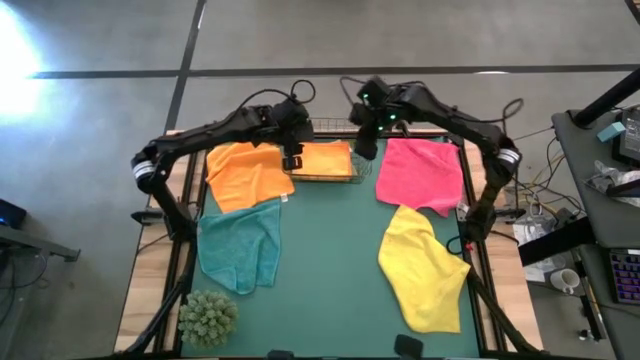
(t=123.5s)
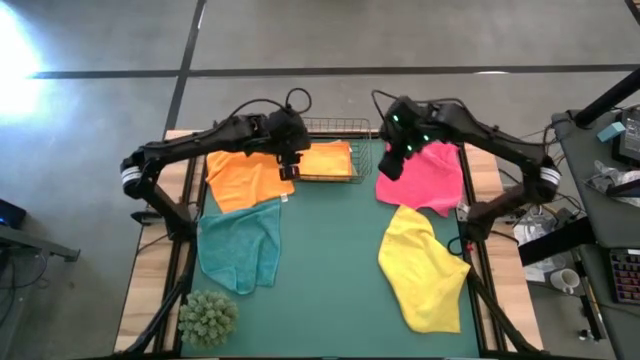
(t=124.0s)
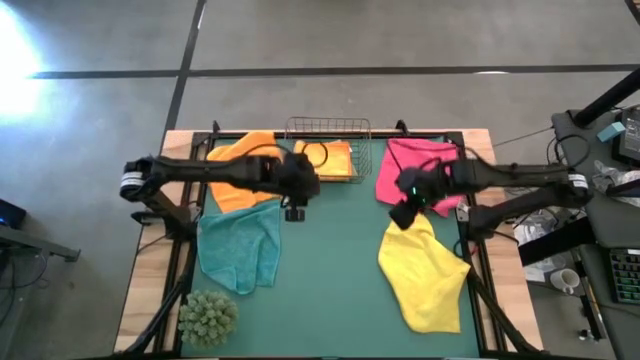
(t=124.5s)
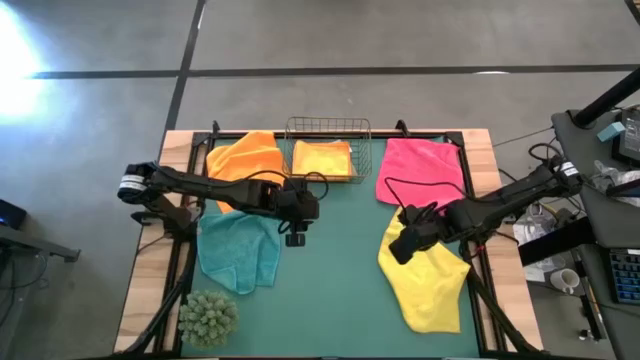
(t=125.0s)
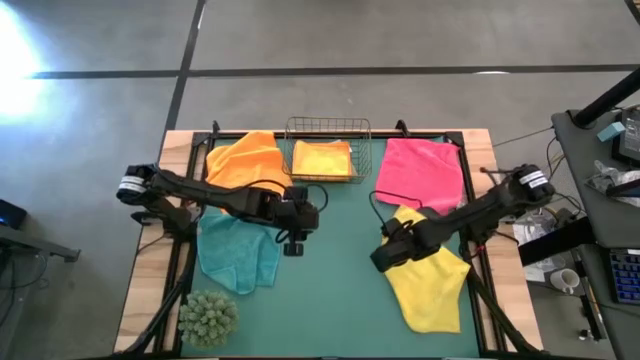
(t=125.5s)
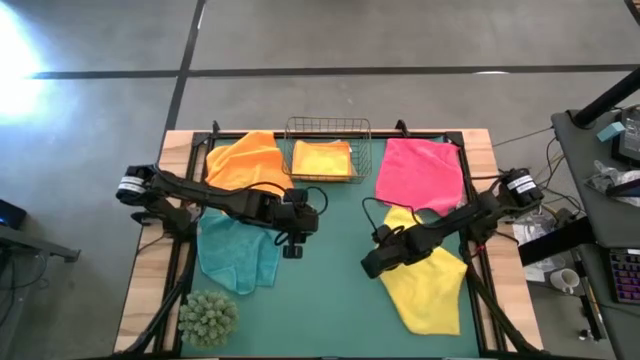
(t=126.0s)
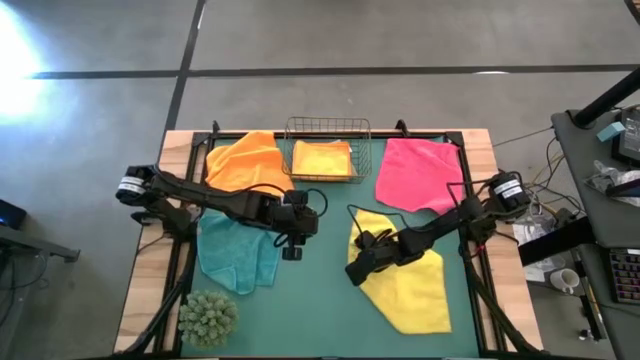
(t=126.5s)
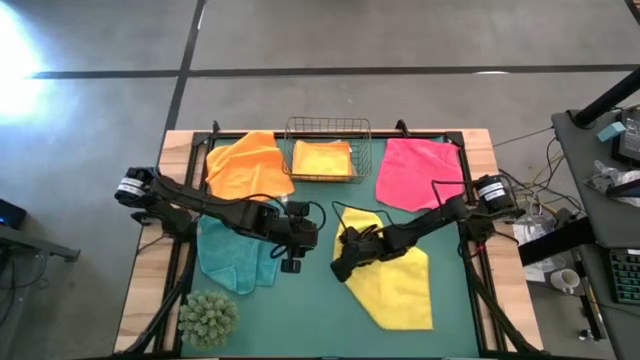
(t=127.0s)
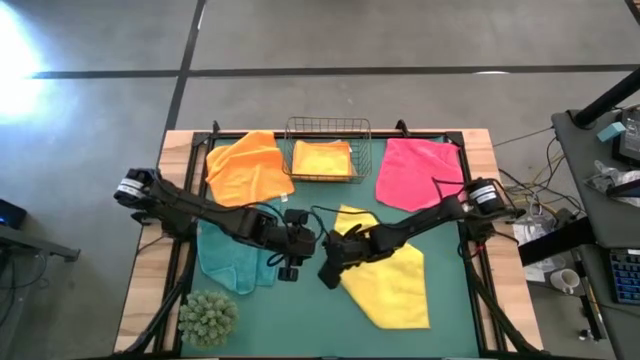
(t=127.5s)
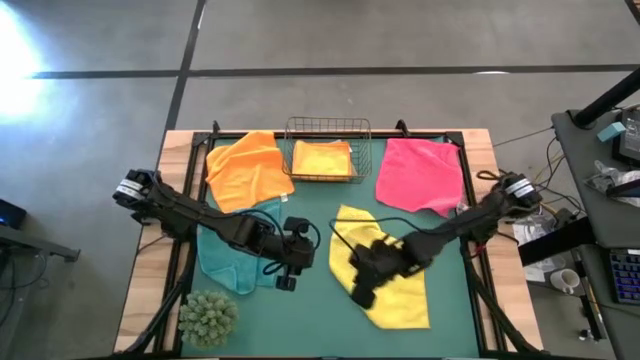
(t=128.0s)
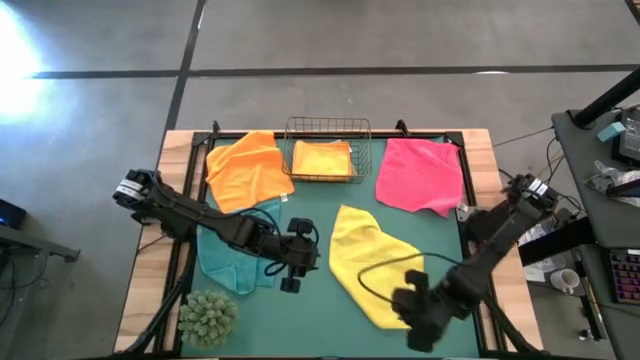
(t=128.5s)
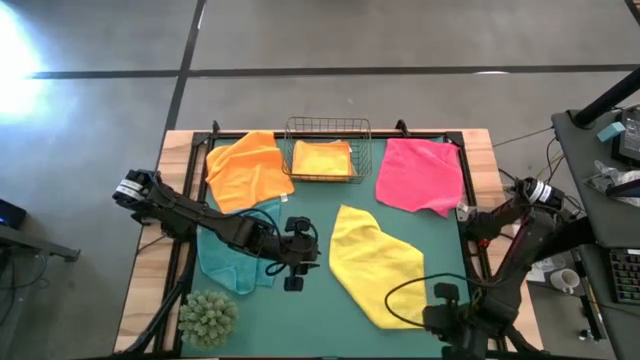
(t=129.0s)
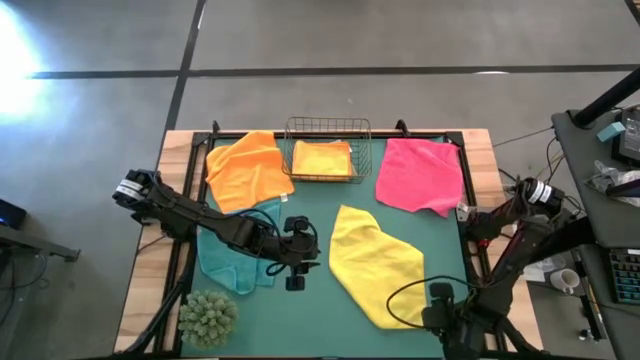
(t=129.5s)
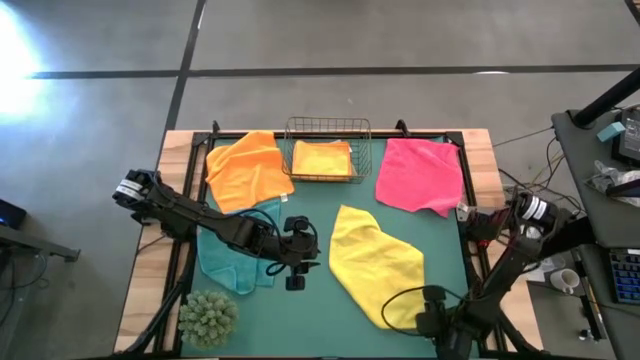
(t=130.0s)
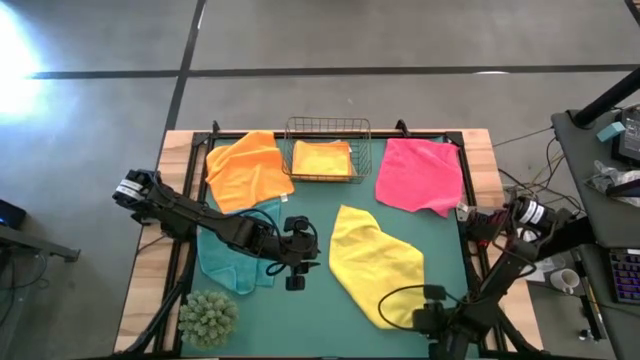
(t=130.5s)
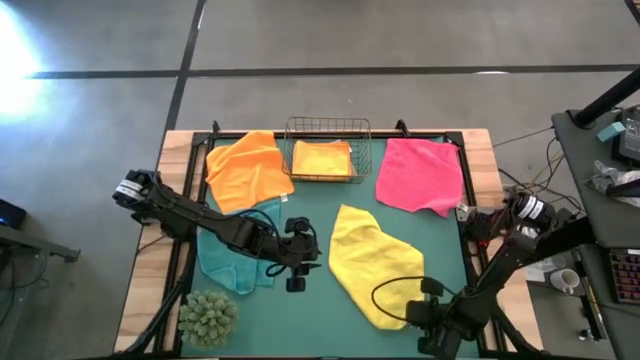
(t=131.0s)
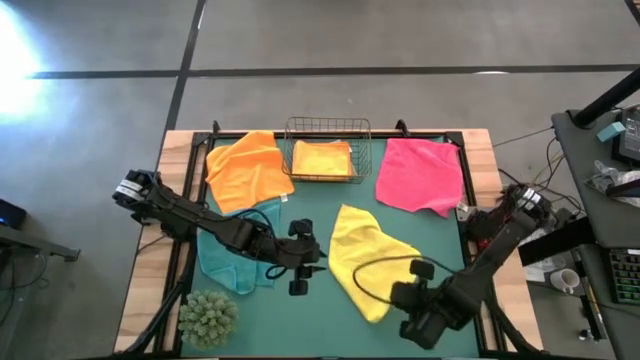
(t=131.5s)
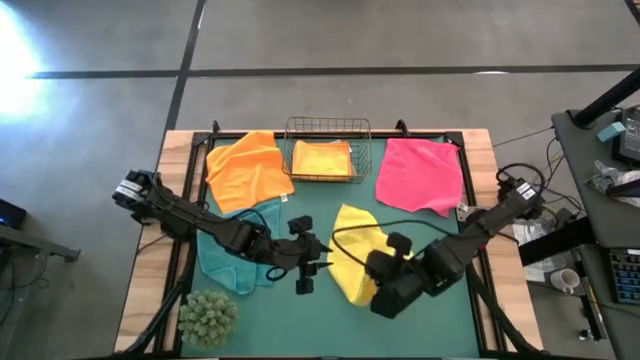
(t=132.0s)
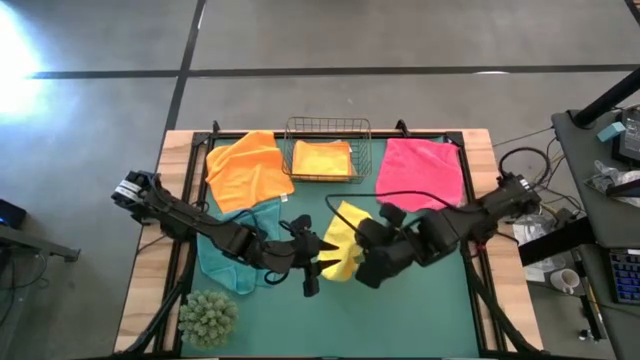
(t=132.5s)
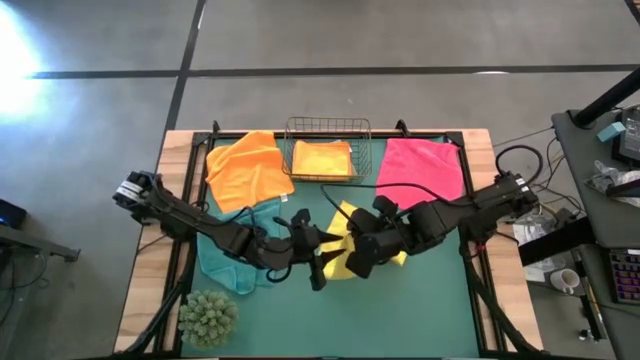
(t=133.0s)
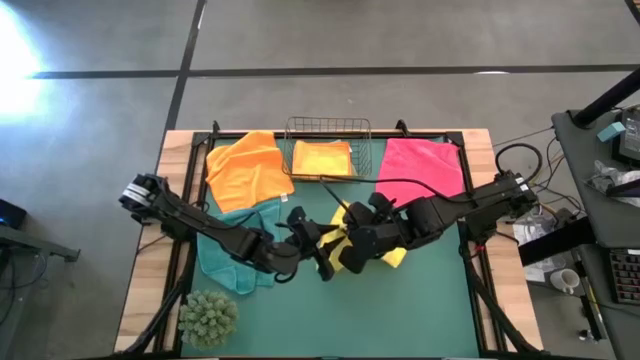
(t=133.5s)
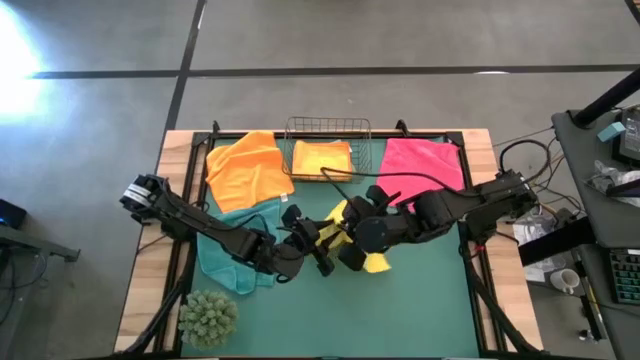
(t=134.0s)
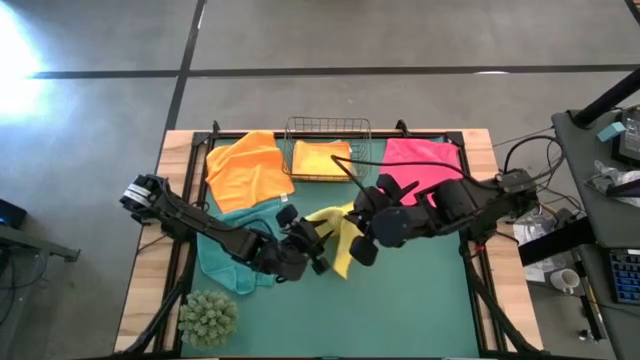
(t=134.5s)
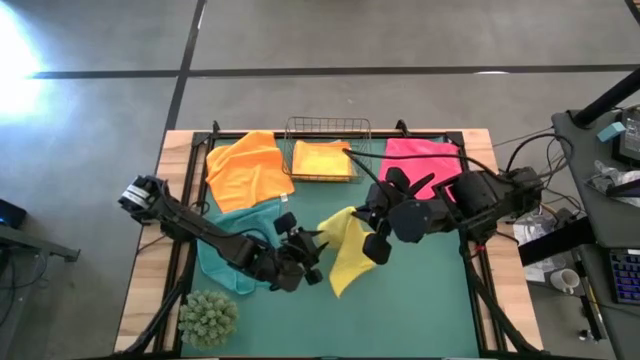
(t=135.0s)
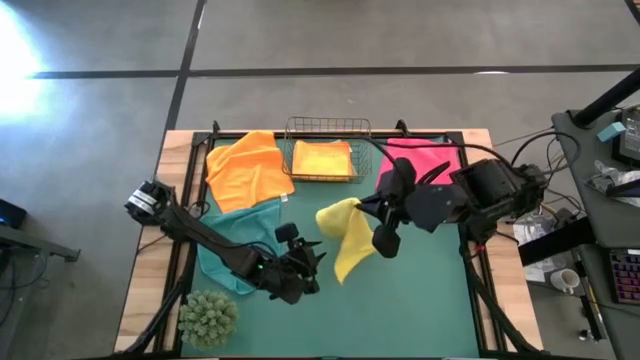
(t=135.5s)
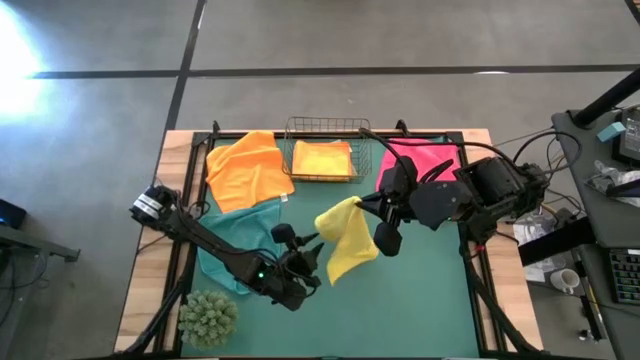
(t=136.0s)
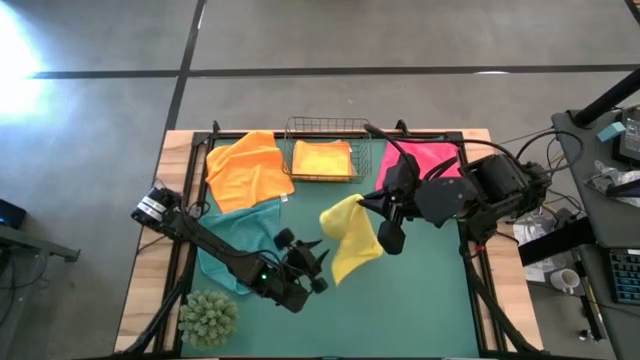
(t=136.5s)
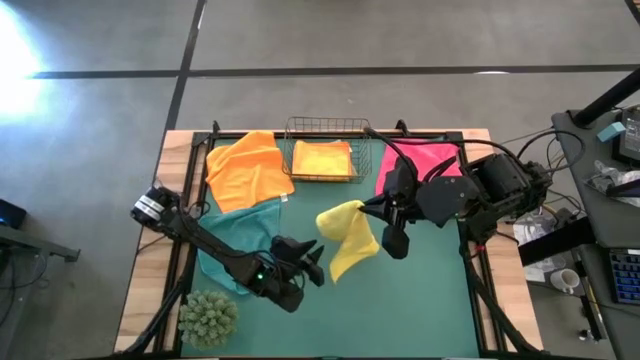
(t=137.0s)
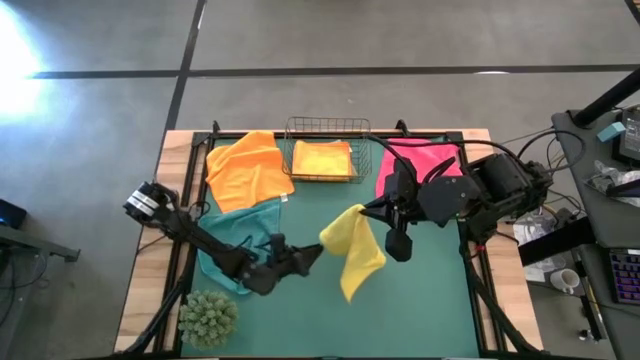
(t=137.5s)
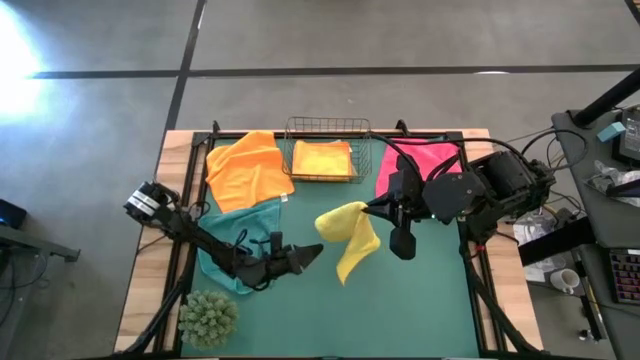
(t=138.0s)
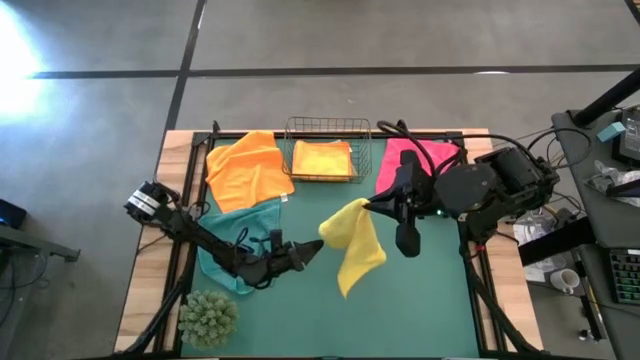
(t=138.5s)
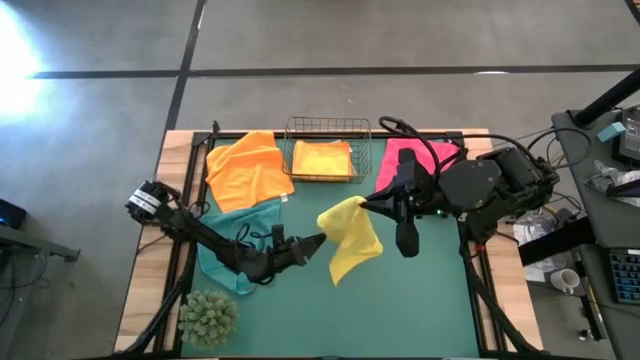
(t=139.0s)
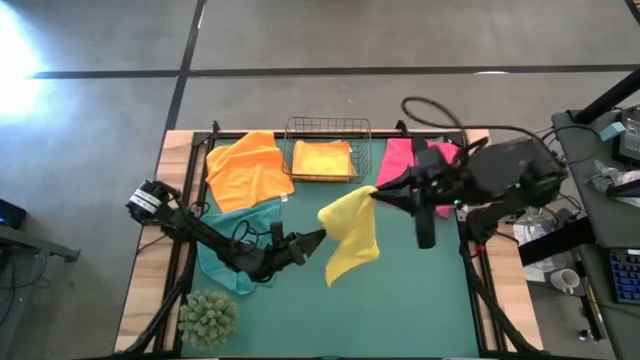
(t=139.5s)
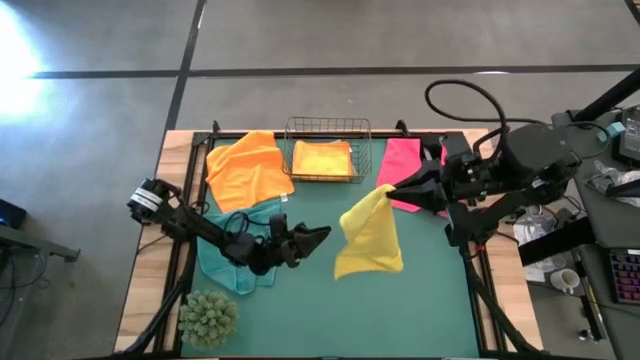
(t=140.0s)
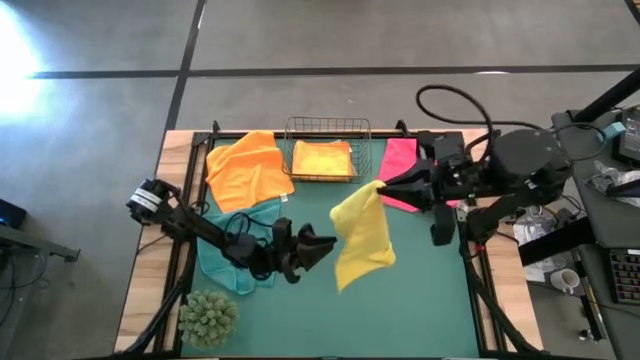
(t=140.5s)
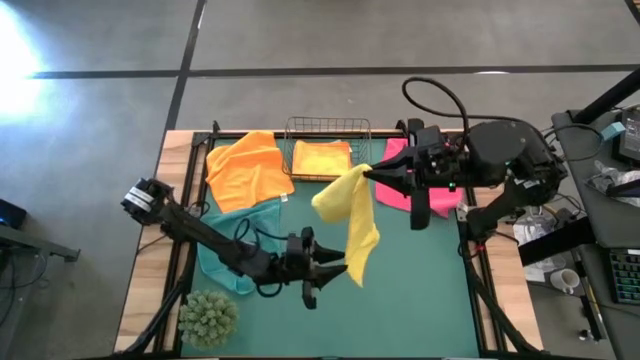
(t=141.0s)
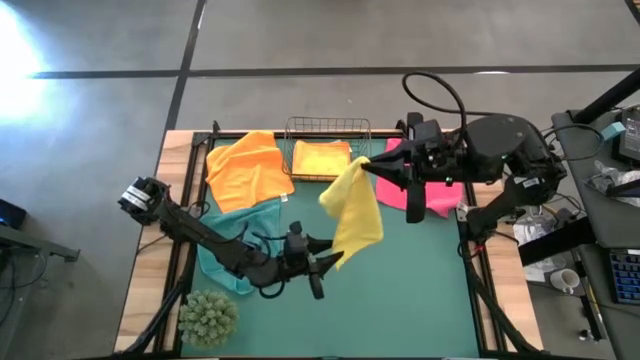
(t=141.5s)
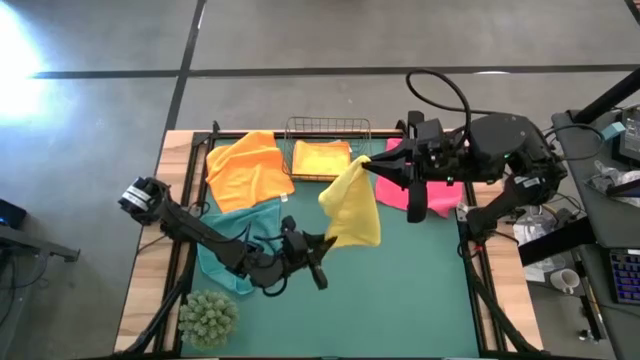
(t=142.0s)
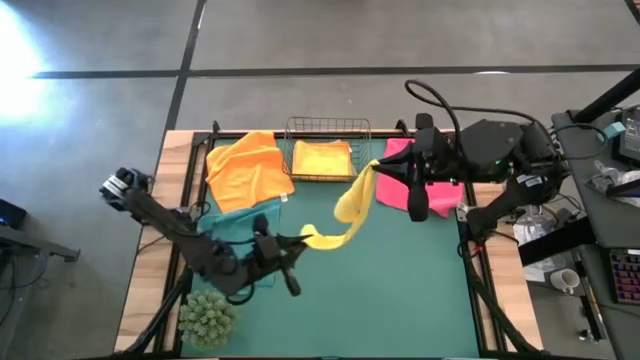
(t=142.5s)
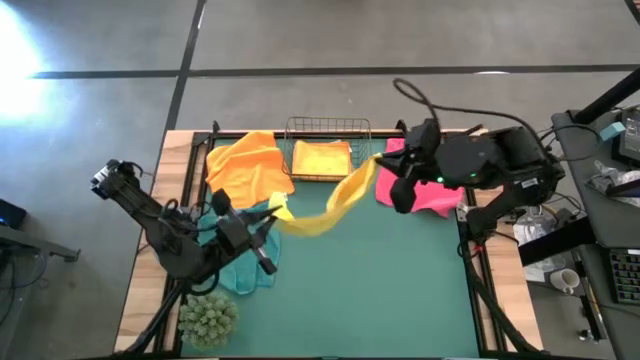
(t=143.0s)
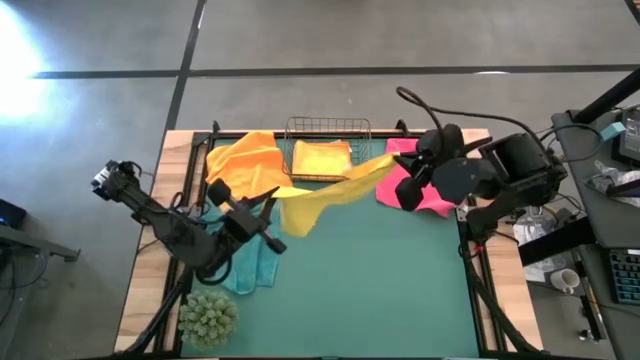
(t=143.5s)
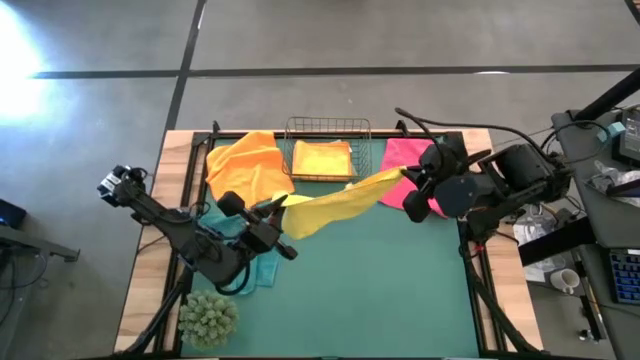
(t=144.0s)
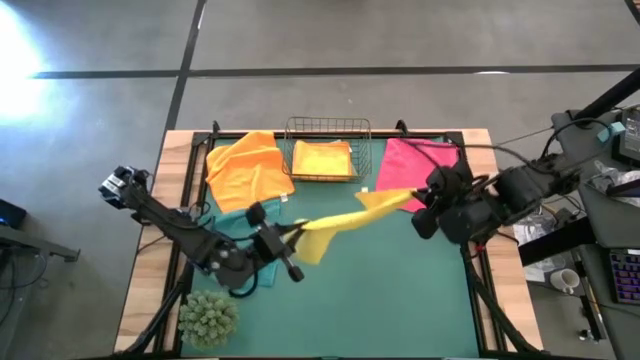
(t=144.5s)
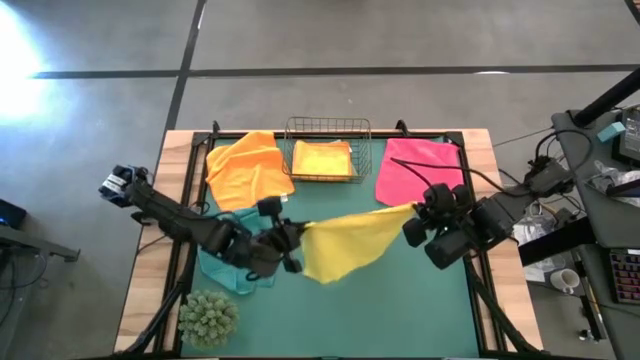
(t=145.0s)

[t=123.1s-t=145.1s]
Task: Fold microfiber towels
Fold the yellow microfiber cloth
